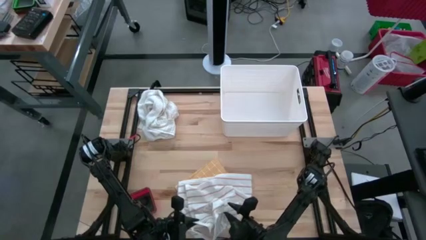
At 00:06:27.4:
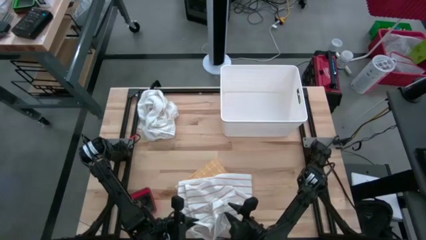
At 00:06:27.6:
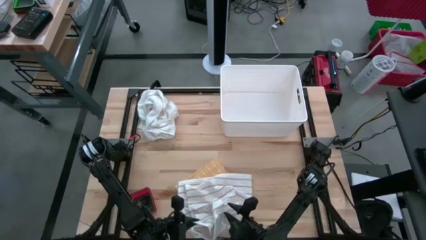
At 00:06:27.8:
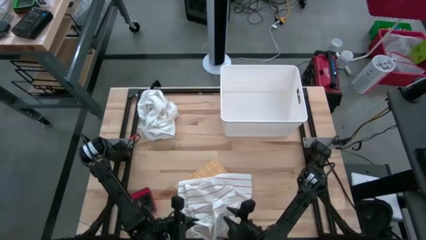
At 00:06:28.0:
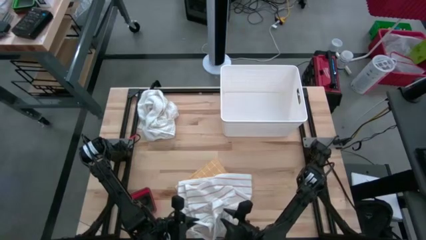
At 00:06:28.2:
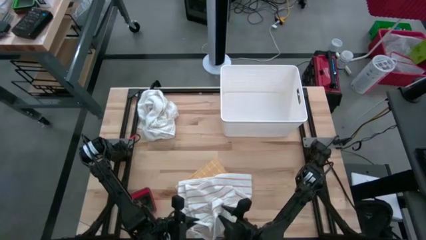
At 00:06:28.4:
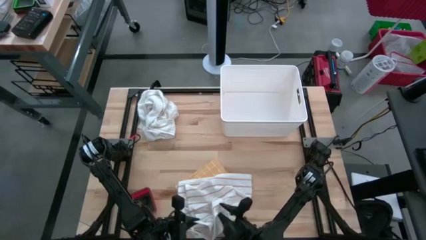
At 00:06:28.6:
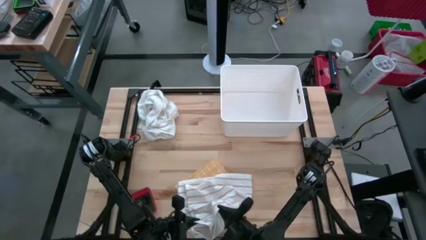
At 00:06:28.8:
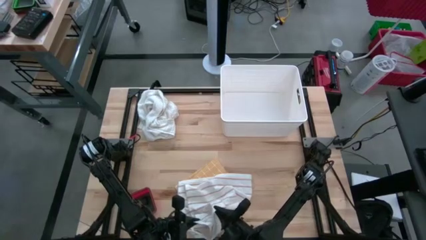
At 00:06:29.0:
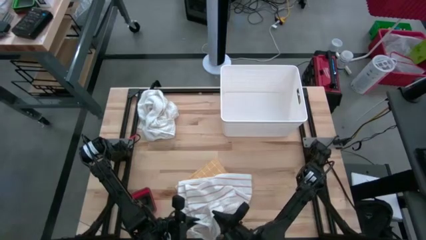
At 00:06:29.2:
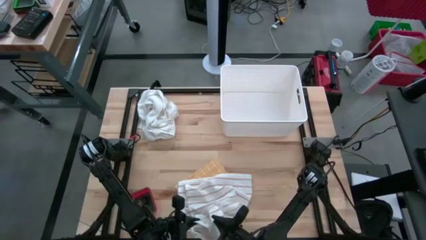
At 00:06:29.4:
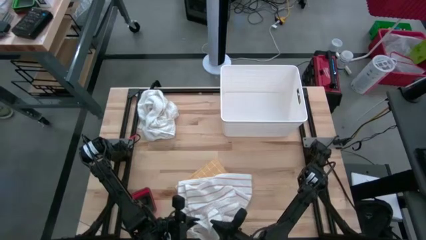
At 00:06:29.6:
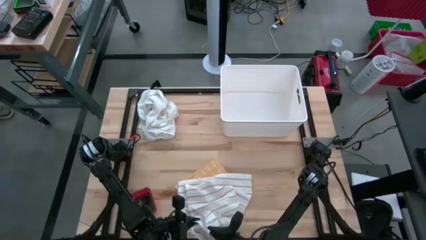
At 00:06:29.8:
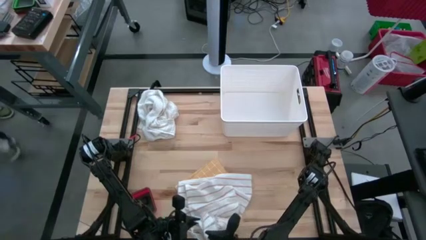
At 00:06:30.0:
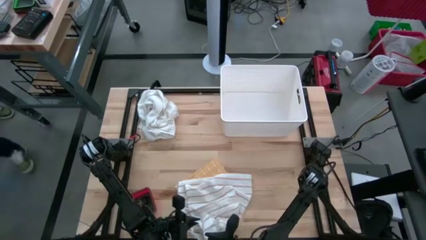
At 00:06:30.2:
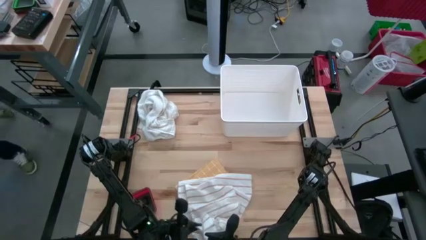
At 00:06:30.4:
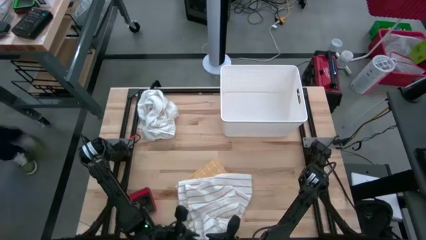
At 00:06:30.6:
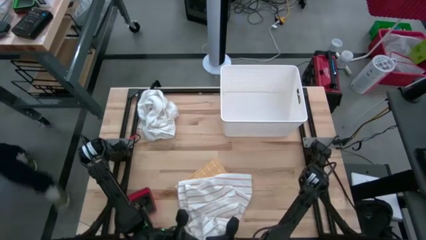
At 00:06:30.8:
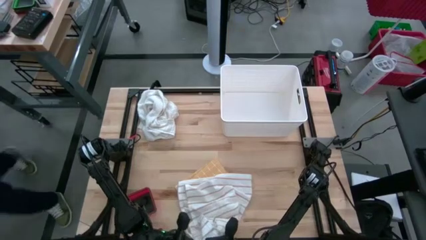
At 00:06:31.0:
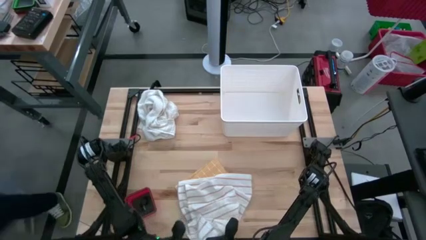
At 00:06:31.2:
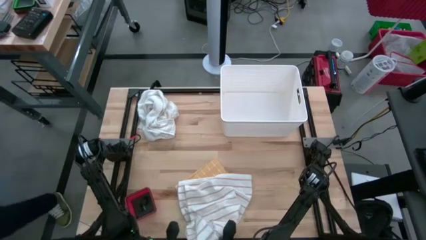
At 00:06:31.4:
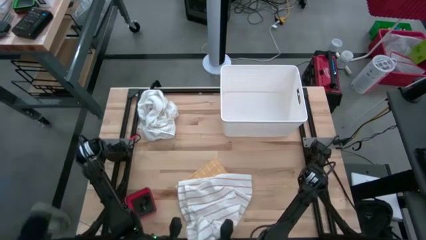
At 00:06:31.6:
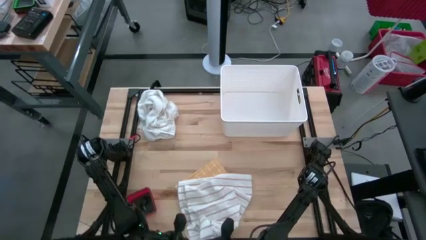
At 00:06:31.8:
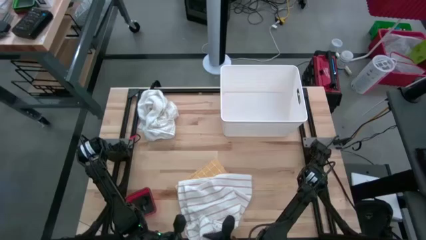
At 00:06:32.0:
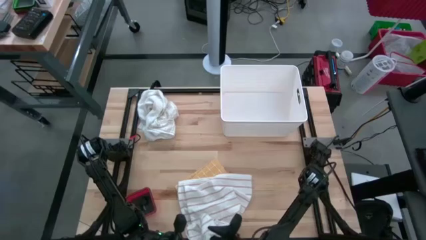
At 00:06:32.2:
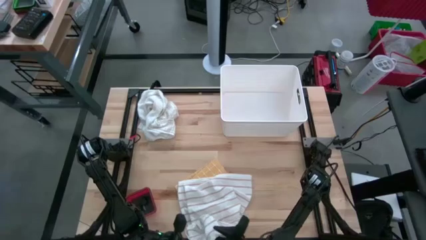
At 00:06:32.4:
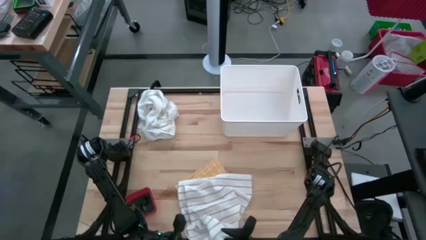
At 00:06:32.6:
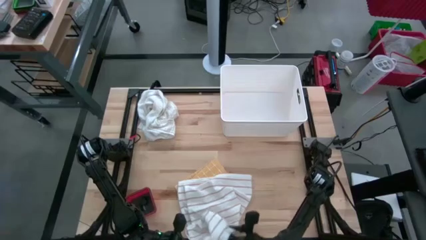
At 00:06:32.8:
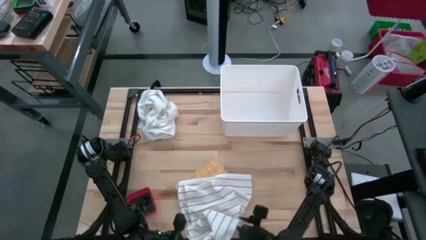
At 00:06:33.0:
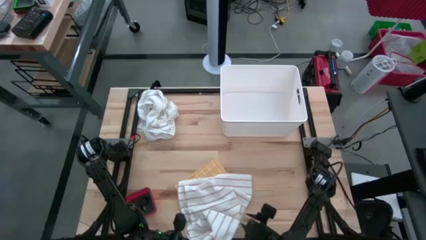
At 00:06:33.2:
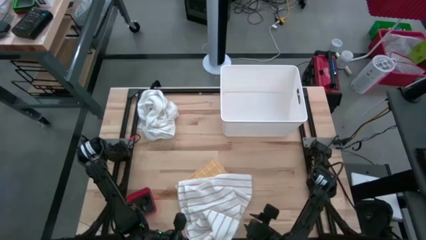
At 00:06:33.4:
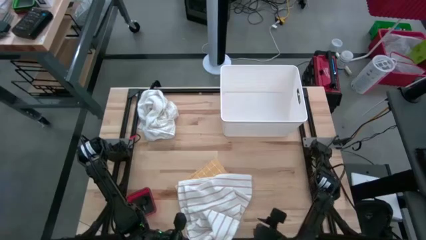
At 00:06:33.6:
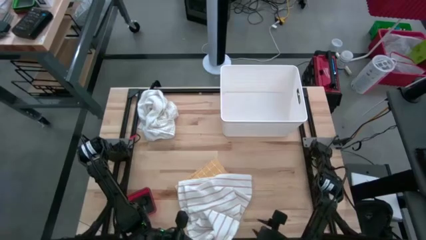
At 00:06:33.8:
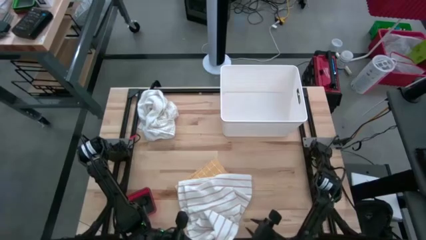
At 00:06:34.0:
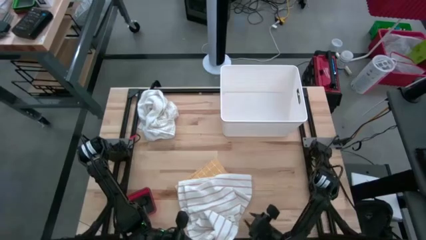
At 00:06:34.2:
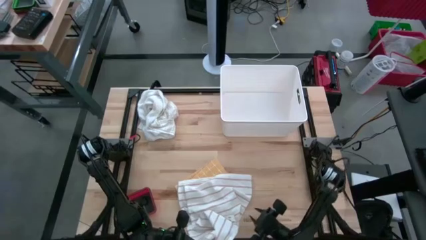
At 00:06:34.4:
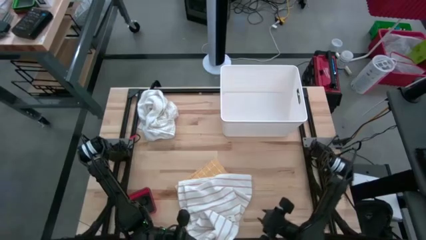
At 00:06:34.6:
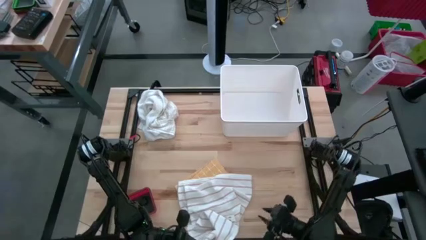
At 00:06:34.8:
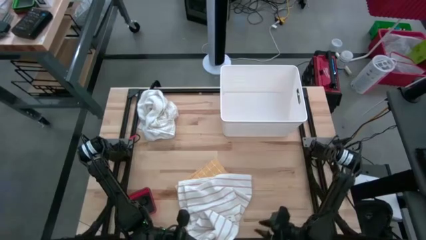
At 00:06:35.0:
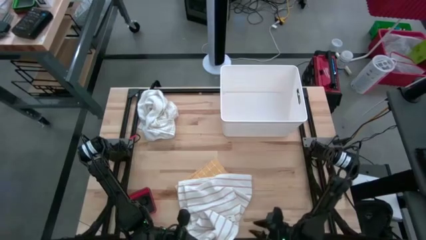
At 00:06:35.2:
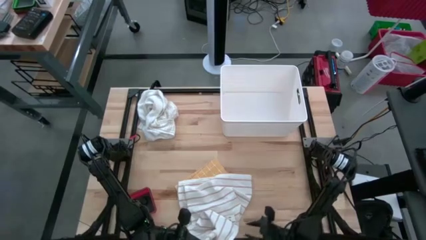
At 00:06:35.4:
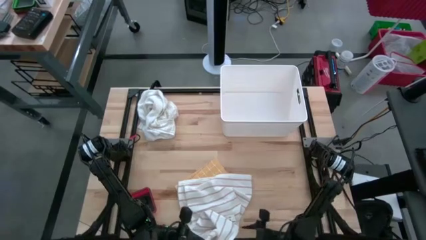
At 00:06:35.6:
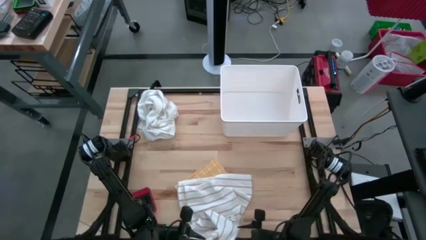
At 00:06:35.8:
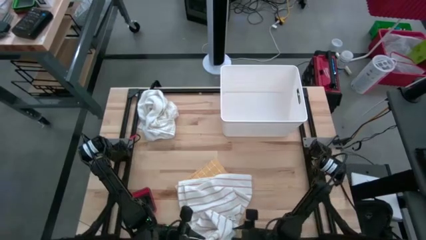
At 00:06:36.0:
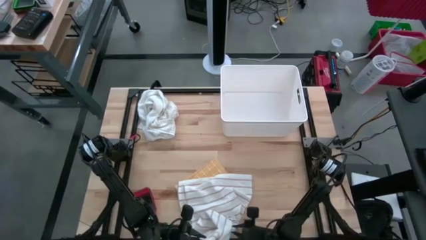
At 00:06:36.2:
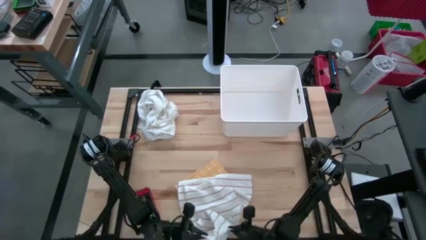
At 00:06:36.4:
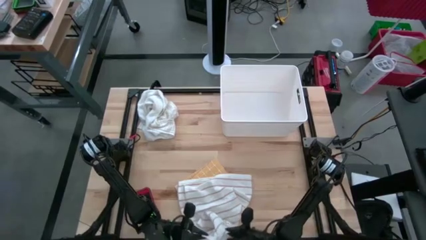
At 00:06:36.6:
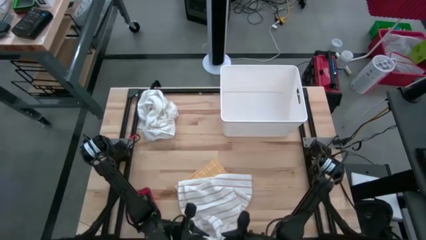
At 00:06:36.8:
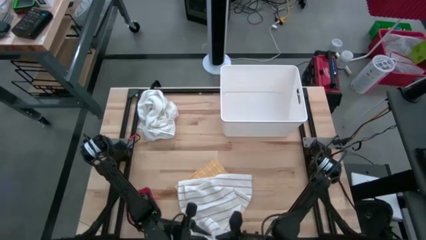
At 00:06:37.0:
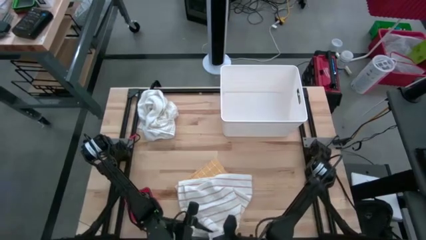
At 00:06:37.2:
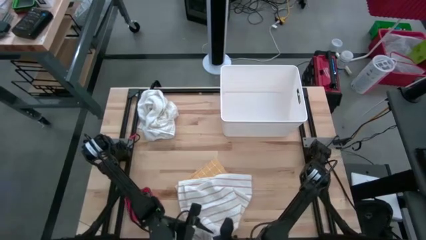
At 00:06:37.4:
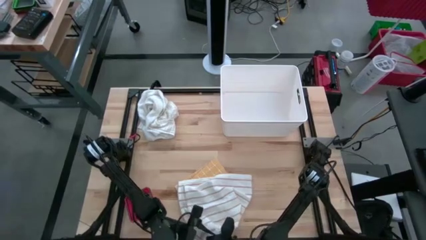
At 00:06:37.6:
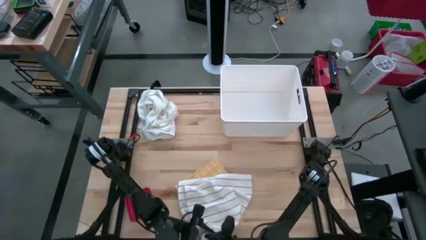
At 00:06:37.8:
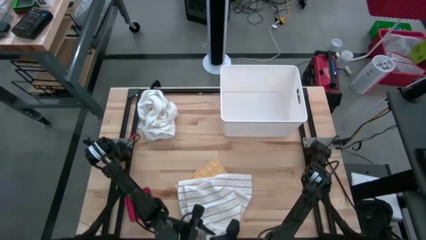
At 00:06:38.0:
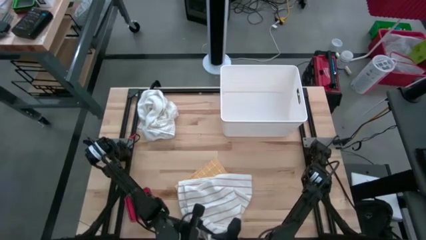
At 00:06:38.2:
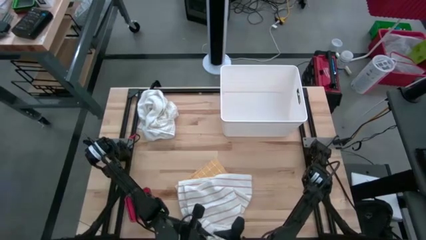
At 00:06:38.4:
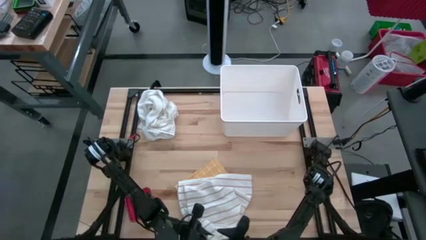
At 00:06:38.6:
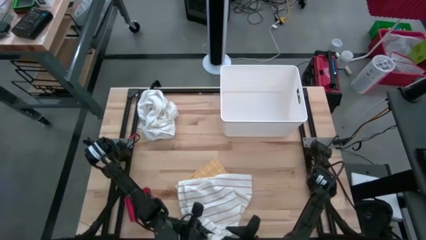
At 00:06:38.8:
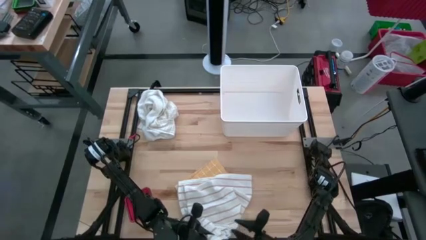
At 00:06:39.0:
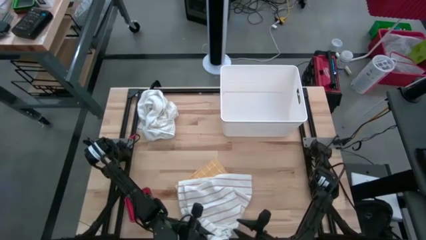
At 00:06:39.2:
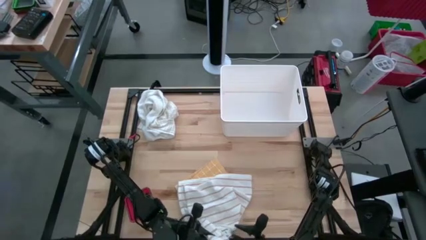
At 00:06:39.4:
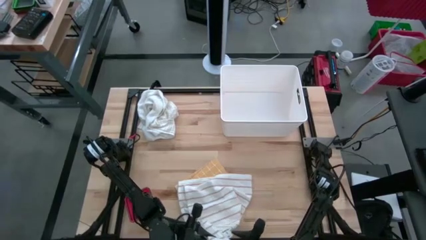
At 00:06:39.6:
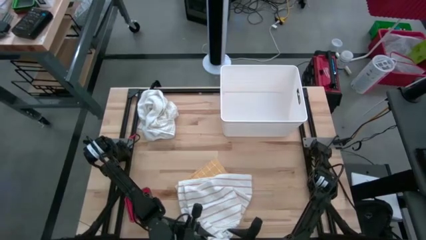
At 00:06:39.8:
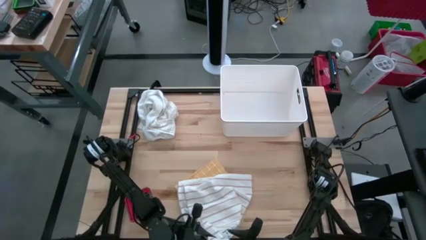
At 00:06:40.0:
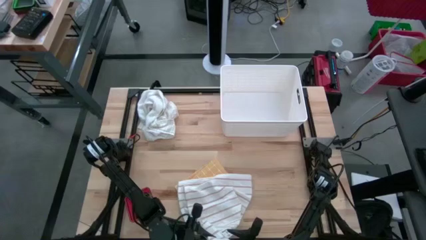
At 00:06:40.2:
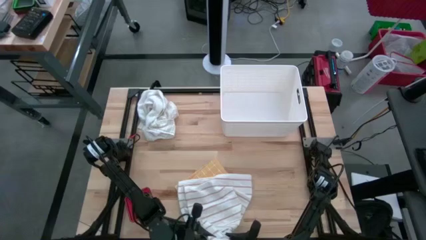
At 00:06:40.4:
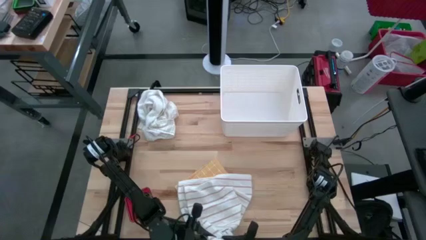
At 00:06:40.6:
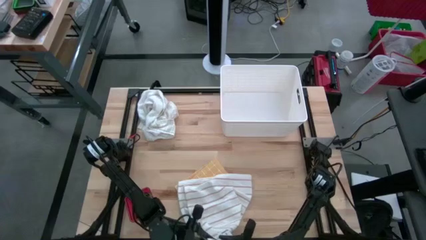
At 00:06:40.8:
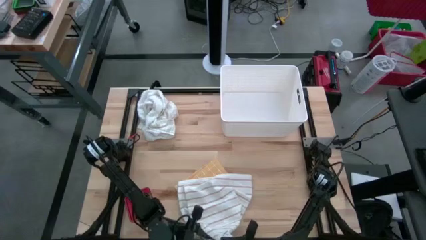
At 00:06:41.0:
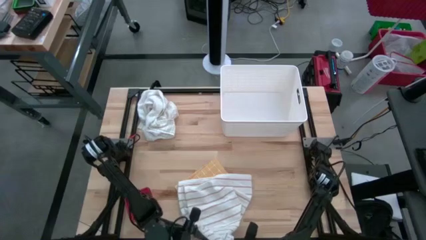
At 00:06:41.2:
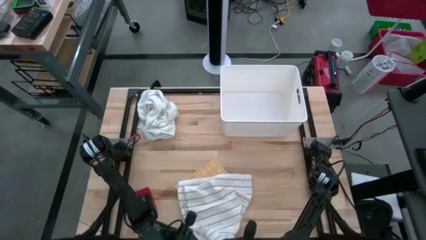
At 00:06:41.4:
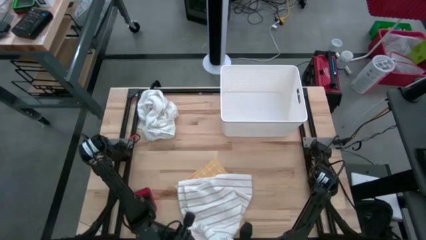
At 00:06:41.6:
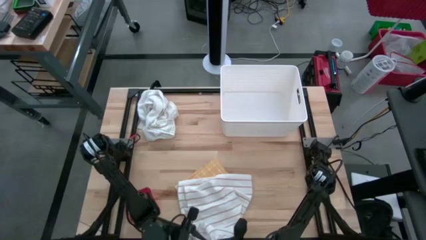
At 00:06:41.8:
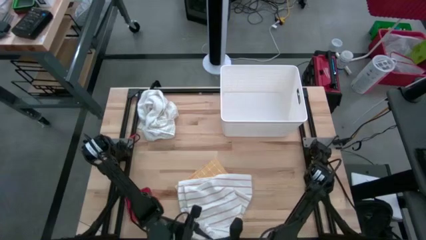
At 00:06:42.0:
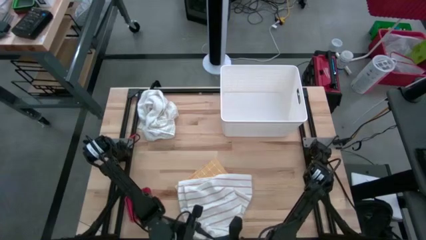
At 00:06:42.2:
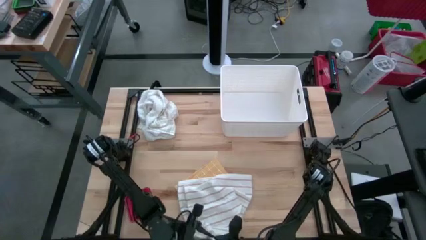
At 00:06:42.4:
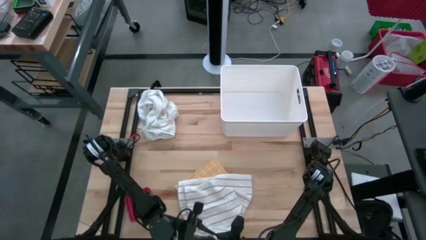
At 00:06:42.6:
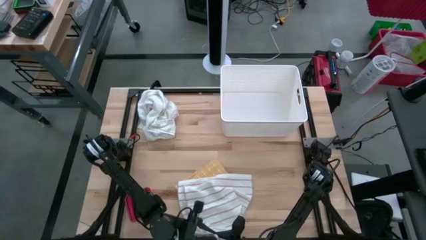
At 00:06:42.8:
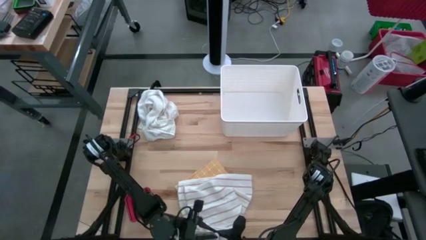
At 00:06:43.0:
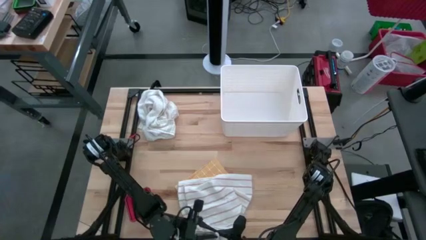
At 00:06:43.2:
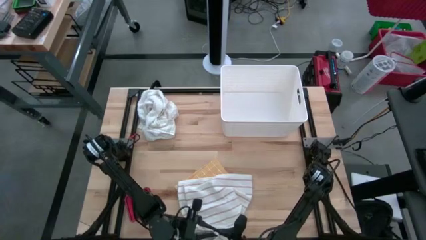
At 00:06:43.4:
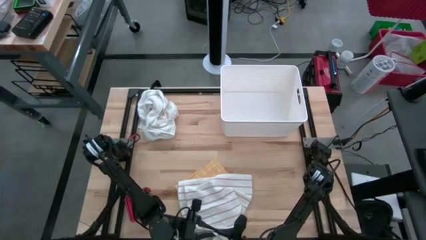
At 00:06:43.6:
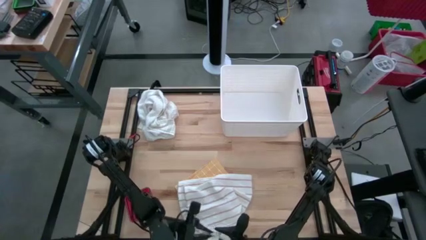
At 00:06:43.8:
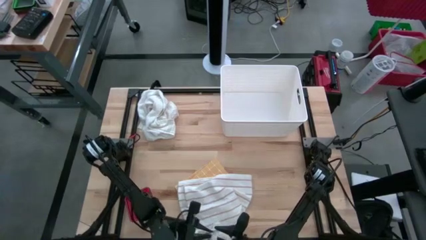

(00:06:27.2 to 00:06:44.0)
Task: Fold towel
Fold the white kitchen towel
